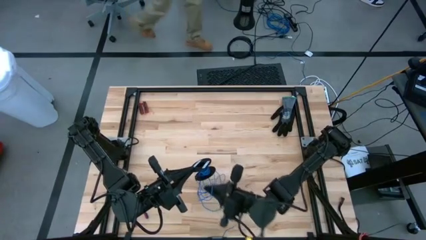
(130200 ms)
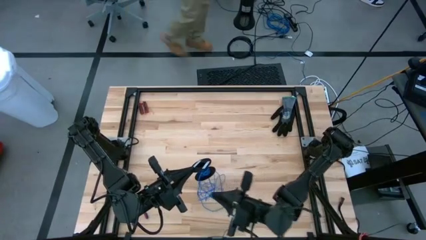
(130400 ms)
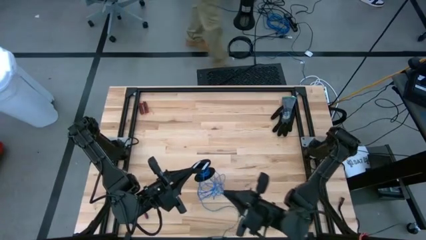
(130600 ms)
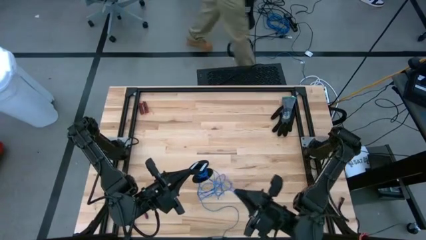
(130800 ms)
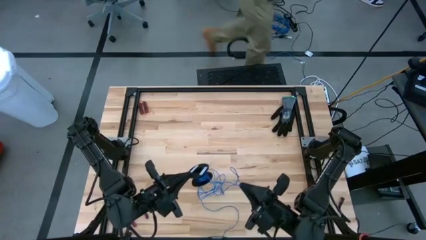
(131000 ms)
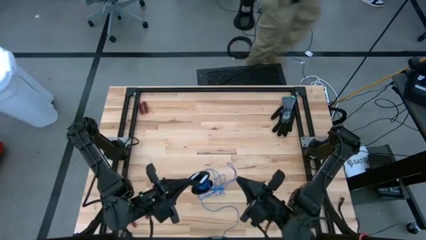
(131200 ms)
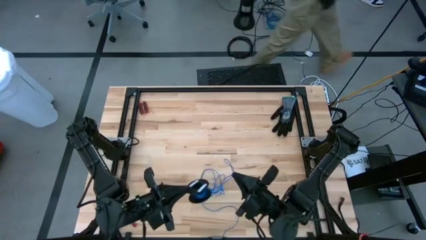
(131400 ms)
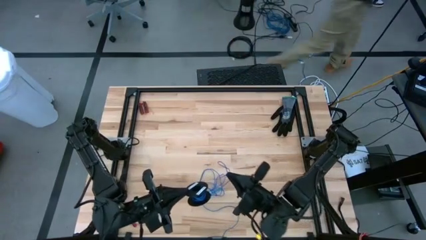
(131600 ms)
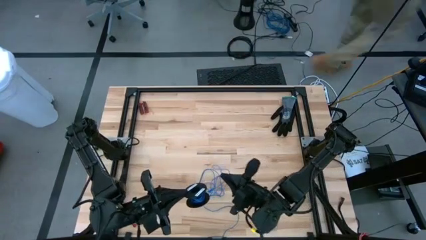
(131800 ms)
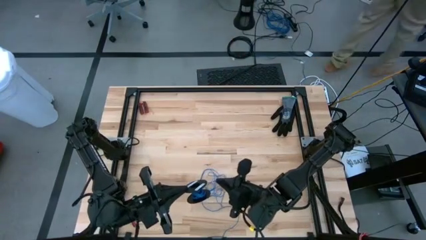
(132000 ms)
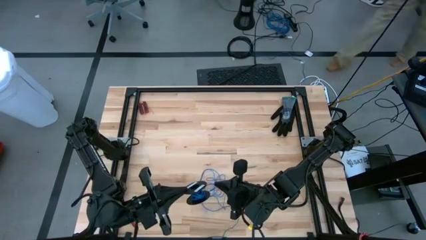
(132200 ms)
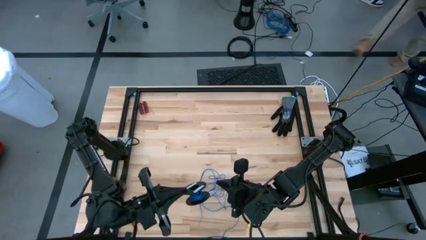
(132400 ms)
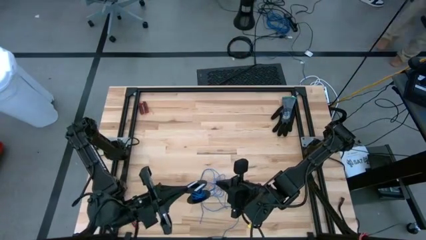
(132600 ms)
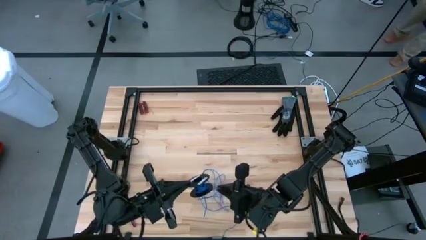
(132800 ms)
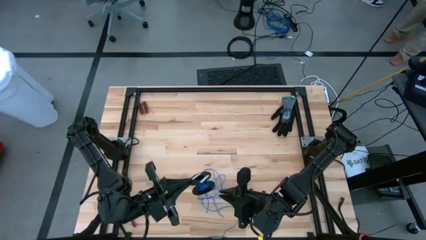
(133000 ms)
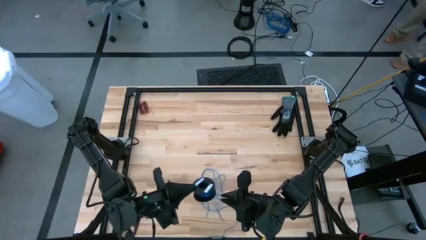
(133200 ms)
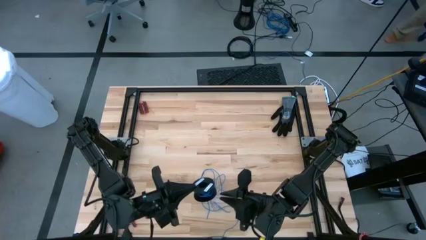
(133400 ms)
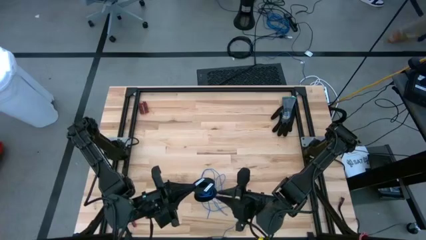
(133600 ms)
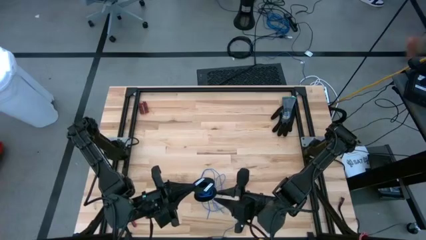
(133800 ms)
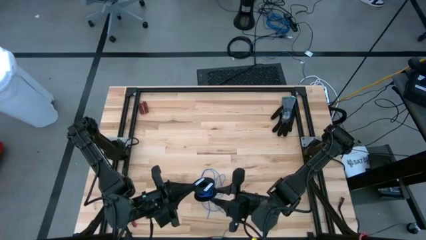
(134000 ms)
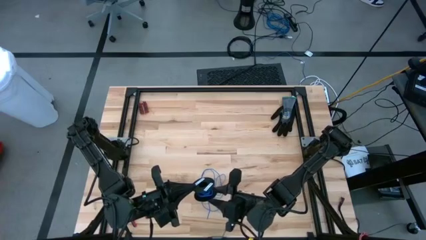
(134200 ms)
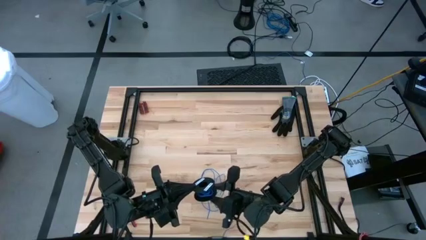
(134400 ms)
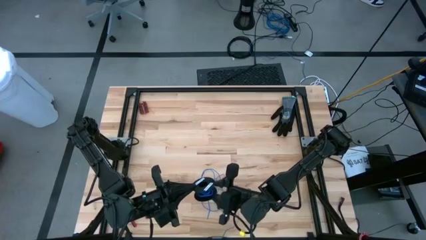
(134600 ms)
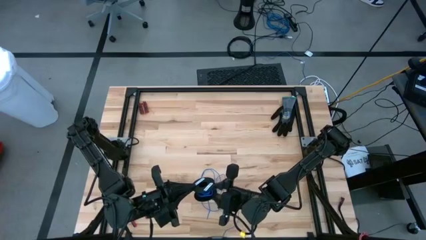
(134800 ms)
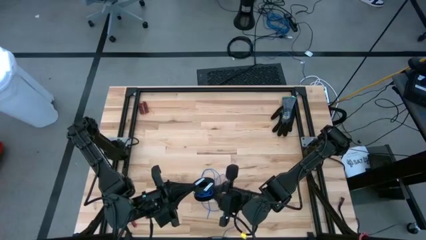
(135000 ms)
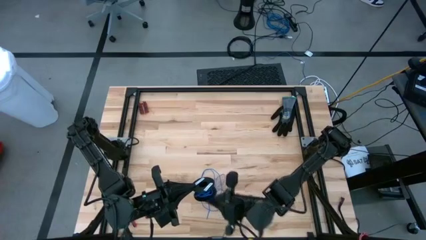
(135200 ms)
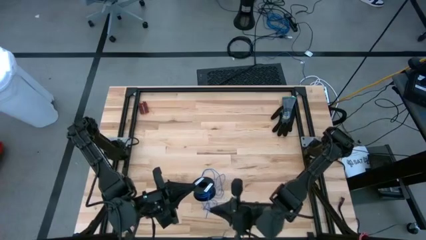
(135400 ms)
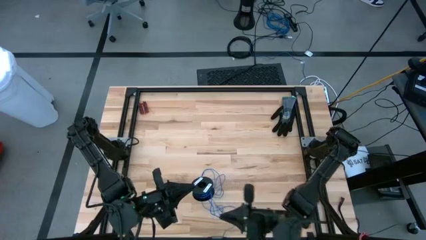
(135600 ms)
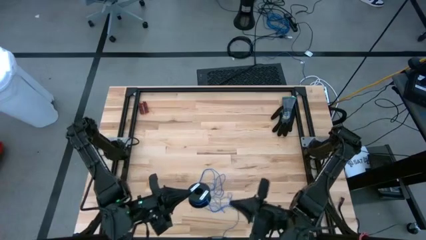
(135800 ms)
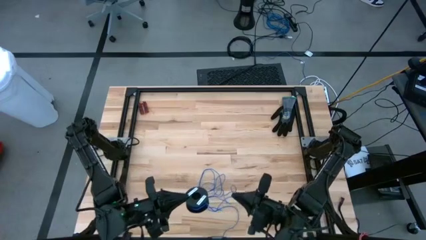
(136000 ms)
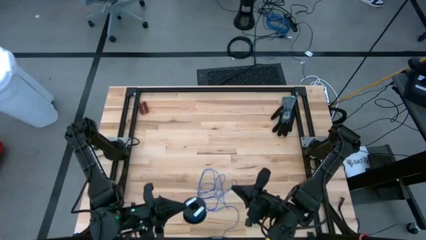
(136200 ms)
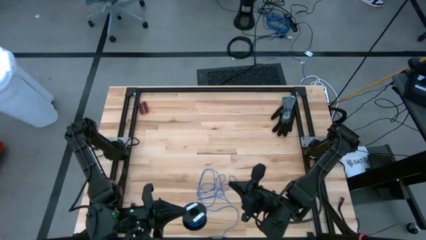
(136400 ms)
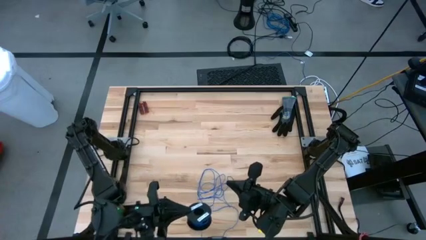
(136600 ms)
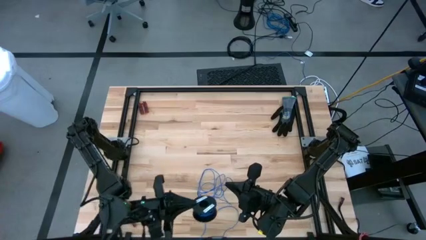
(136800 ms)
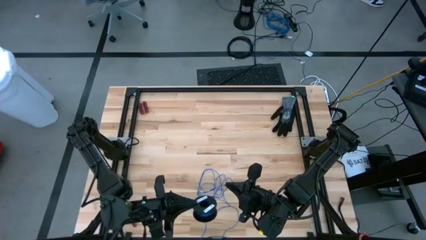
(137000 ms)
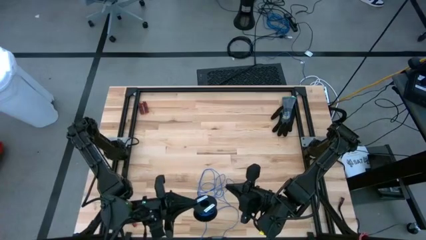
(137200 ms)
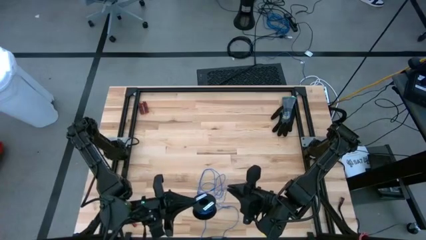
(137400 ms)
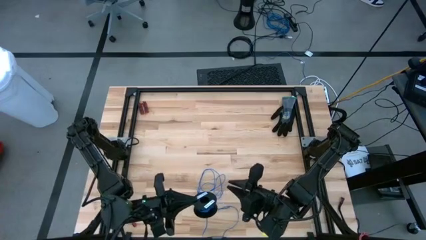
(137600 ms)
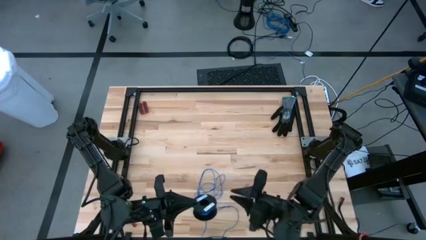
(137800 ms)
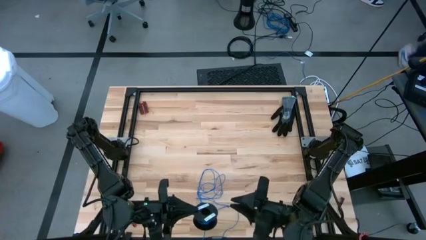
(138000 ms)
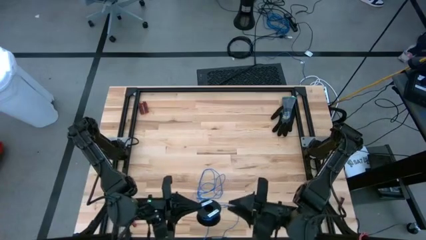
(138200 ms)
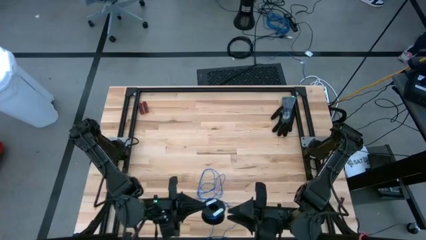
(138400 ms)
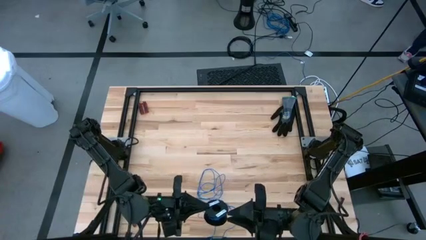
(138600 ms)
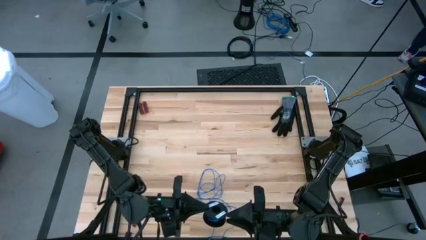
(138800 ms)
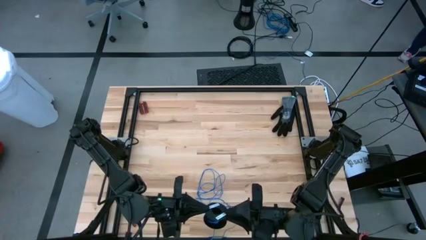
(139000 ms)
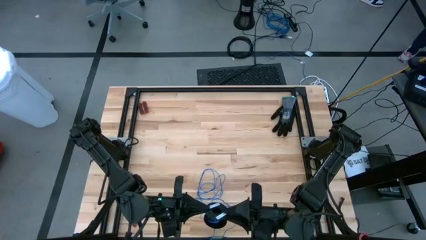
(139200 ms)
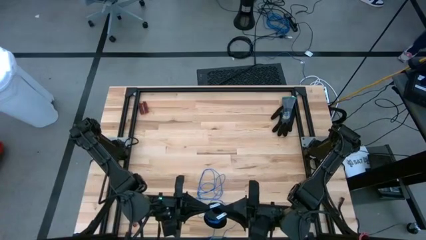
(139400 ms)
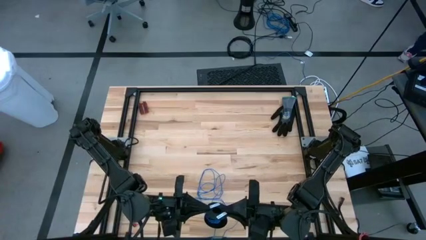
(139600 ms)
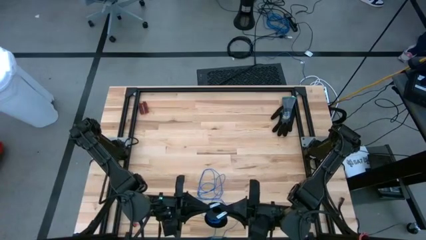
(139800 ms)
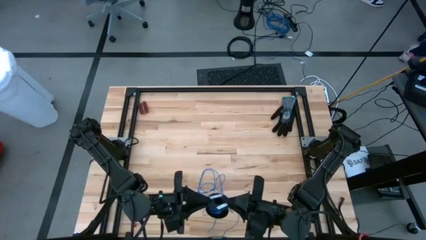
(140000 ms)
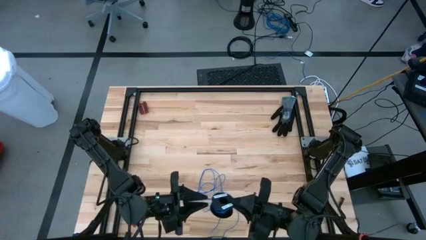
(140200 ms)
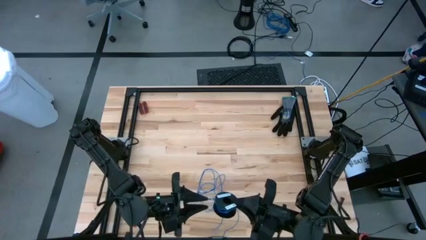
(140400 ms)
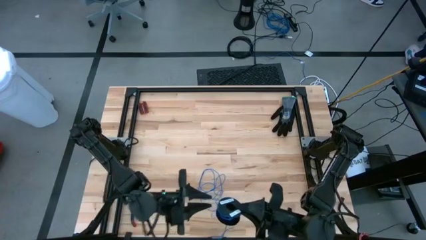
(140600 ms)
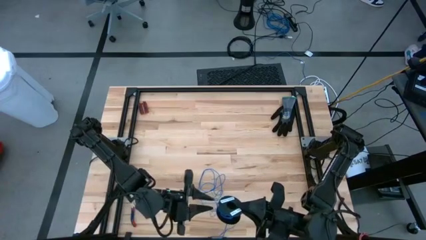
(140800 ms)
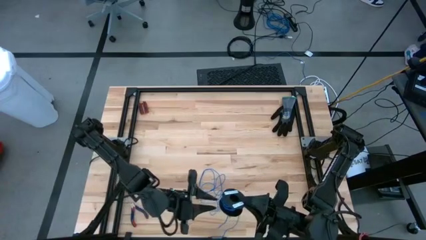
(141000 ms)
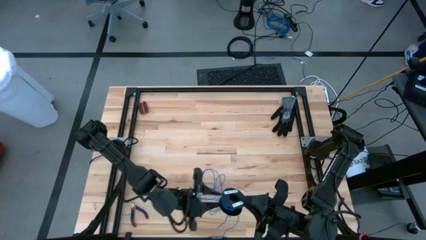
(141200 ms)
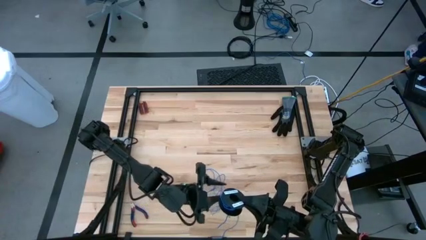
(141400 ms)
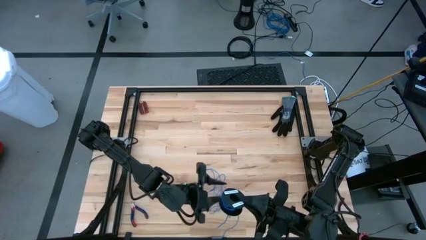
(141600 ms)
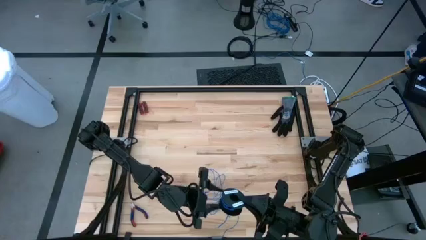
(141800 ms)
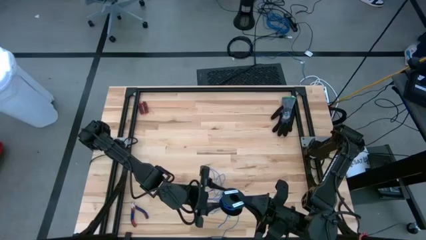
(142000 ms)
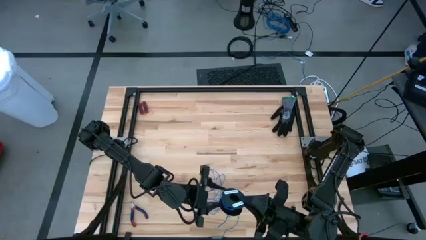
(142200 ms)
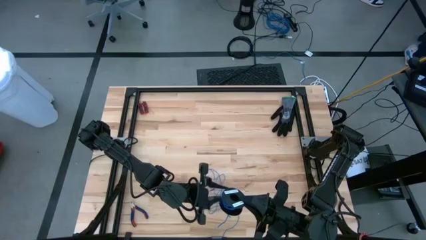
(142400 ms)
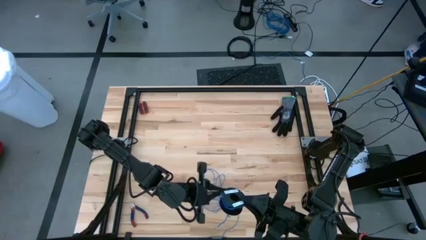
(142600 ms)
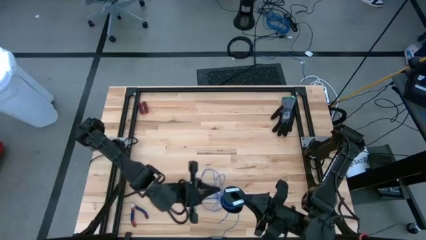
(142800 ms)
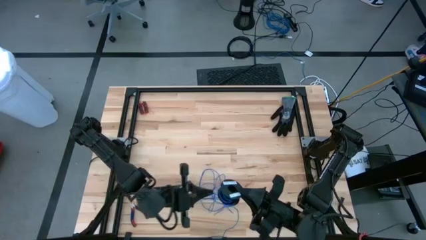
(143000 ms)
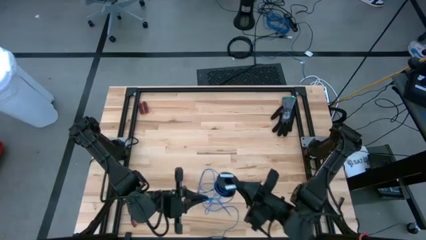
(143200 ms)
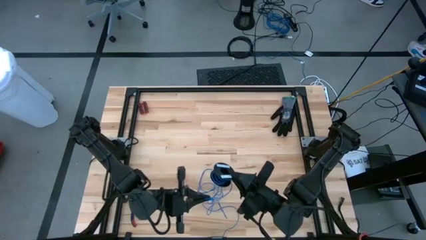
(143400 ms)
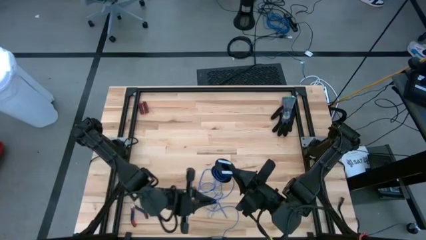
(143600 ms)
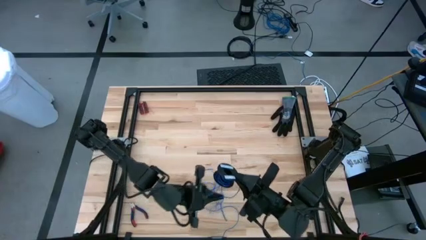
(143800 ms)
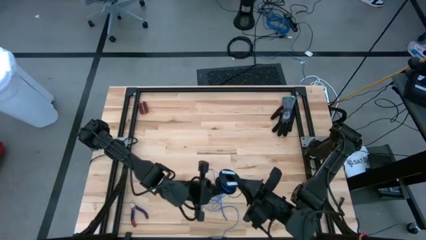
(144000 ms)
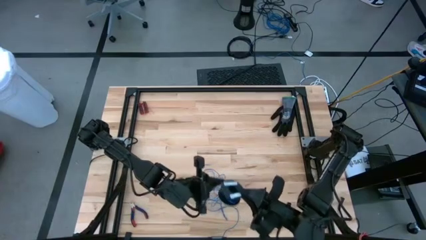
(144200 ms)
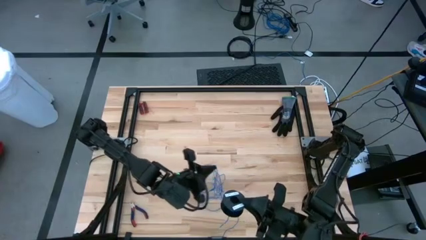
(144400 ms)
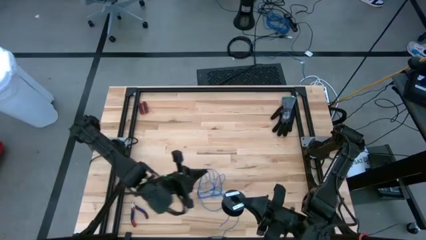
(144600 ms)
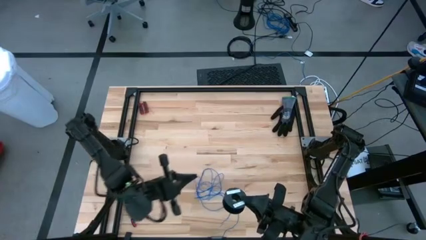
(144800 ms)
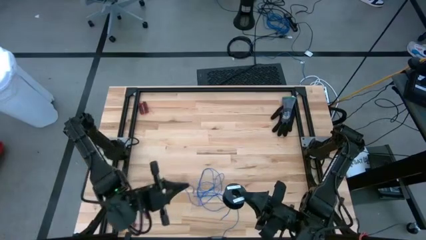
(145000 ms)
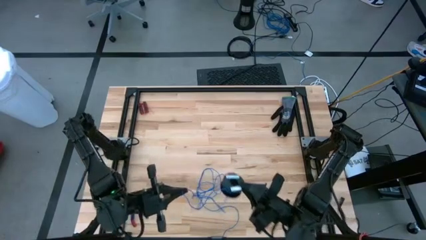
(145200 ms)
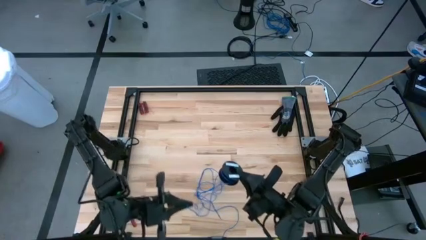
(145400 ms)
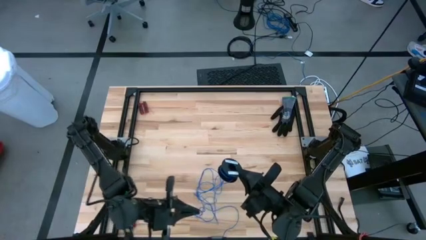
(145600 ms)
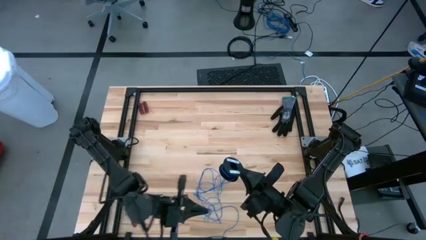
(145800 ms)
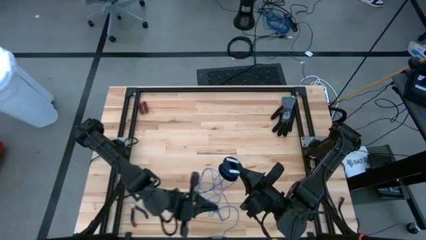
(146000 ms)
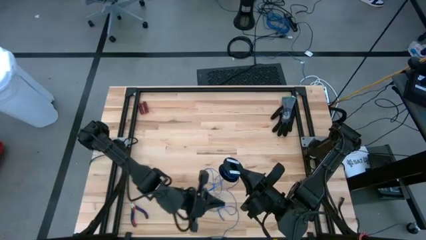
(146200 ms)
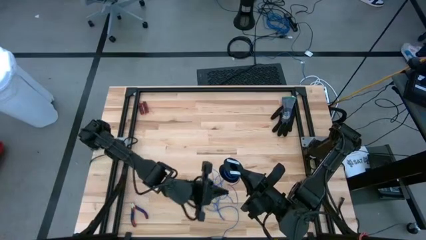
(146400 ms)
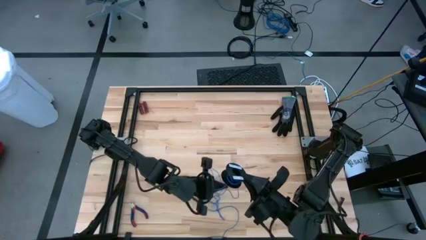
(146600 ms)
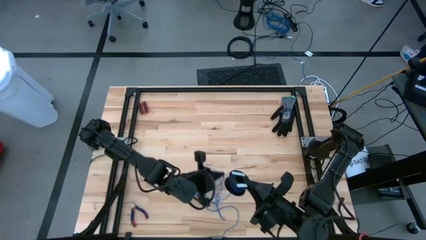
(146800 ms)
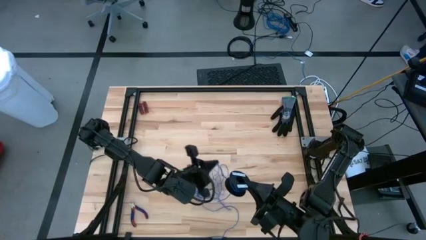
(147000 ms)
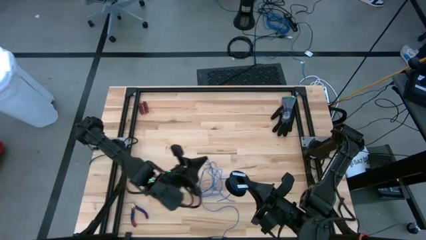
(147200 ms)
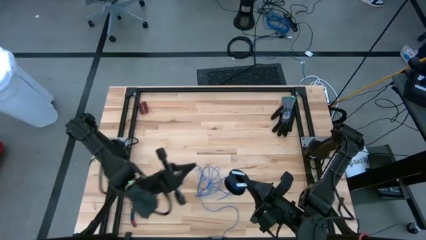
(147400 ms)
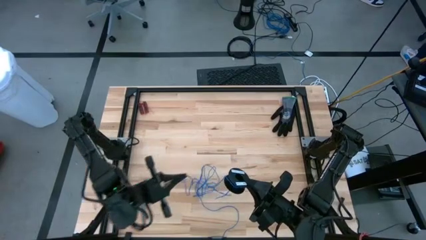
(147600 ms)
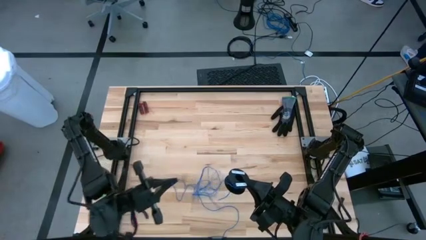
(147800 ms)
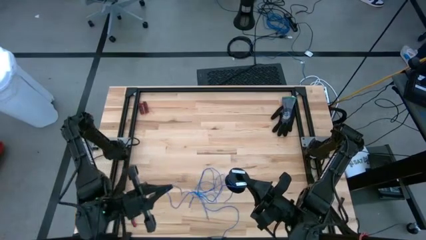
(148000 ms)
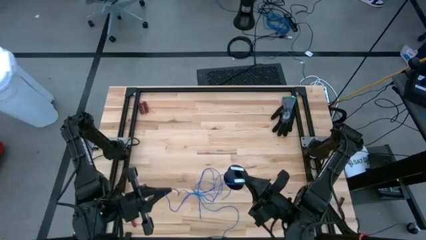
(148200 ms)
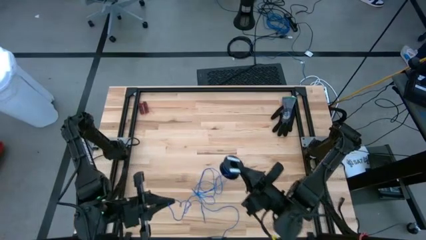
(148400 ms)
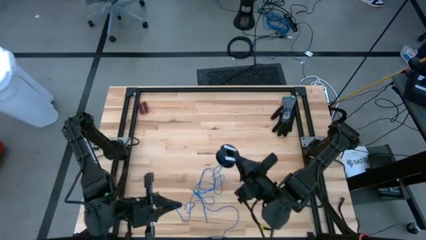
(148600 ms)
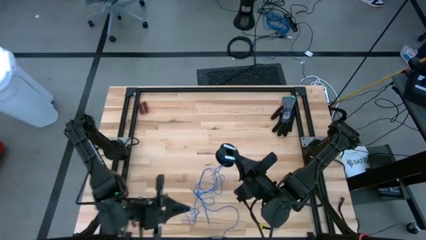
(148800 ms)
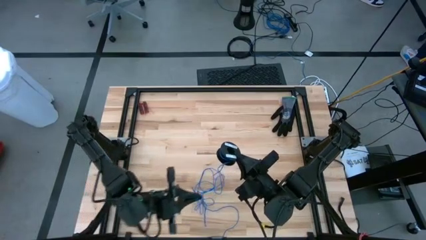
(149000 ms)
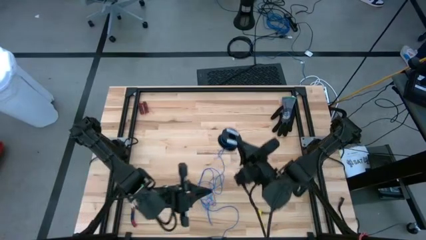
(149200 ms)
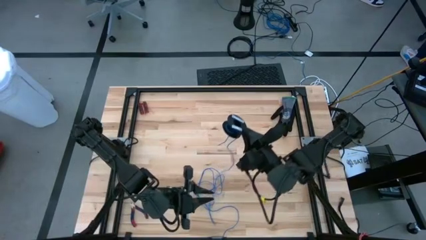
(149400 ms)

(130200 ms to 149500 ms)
Task: Coil cords
Uncoil the blue wire from the spool
